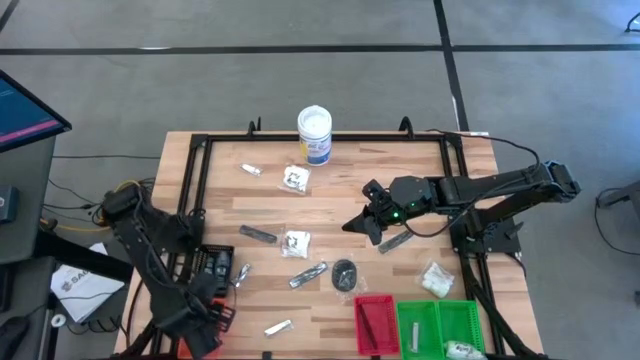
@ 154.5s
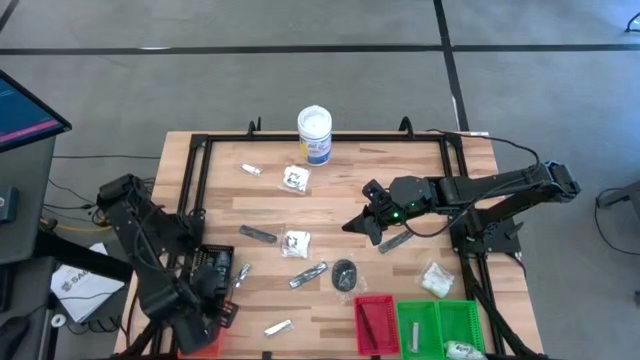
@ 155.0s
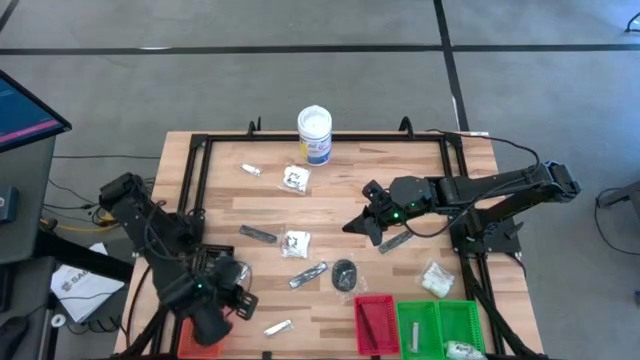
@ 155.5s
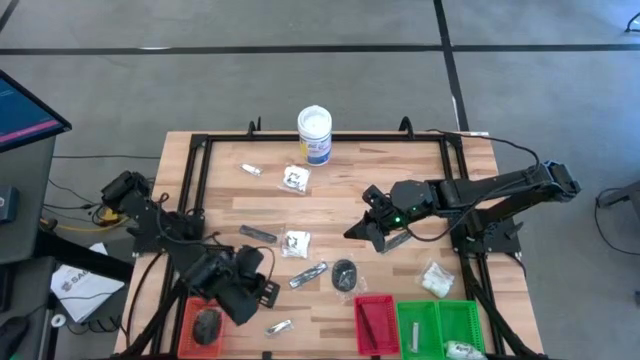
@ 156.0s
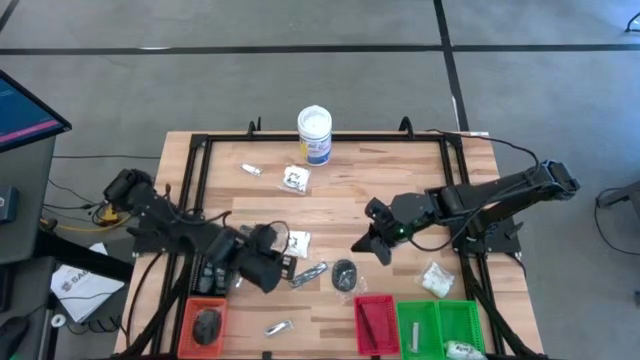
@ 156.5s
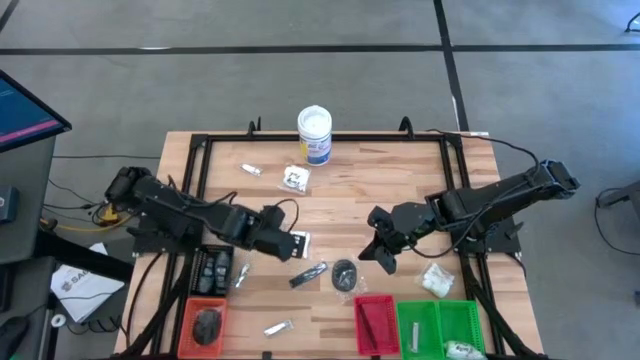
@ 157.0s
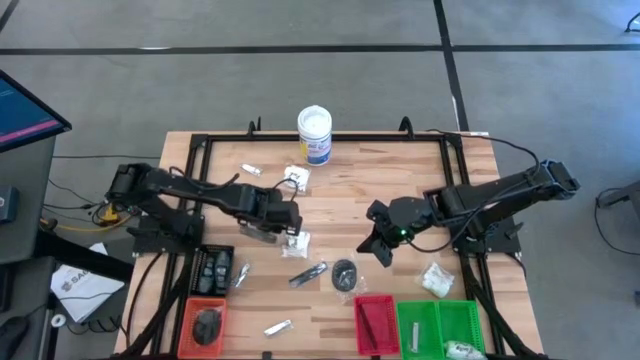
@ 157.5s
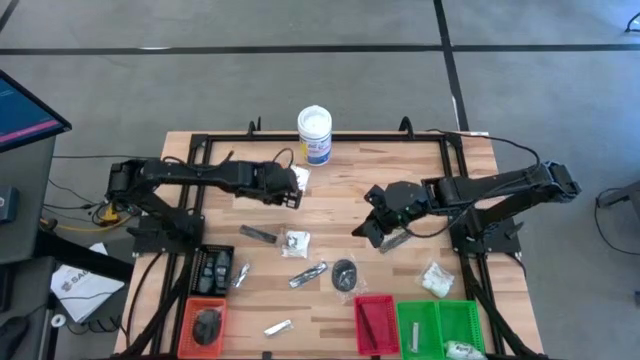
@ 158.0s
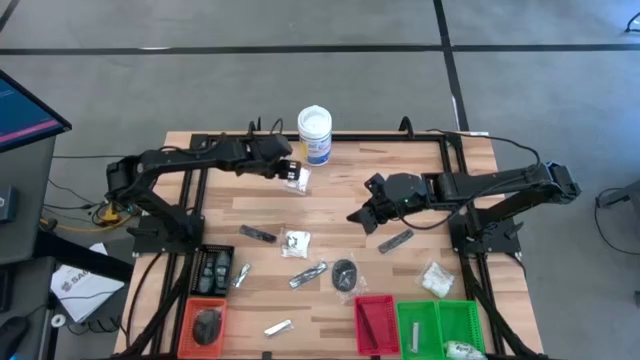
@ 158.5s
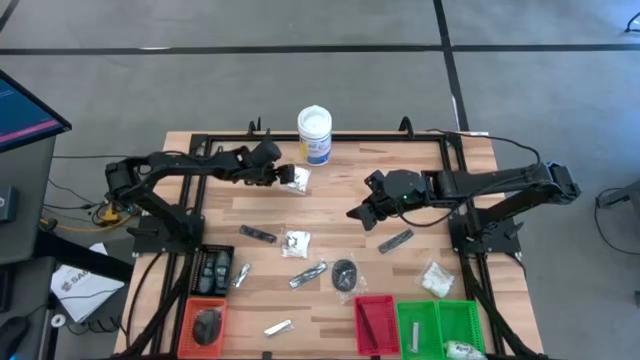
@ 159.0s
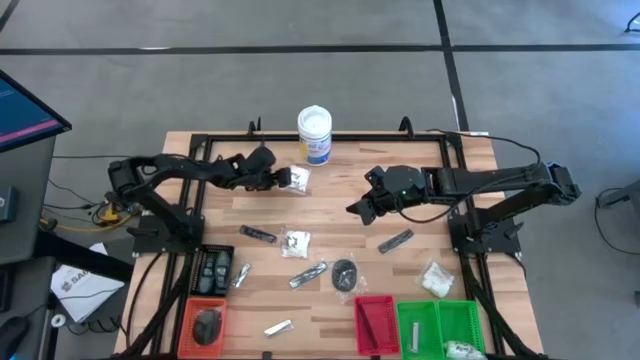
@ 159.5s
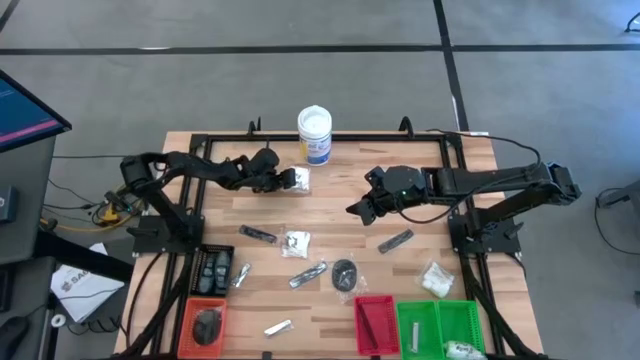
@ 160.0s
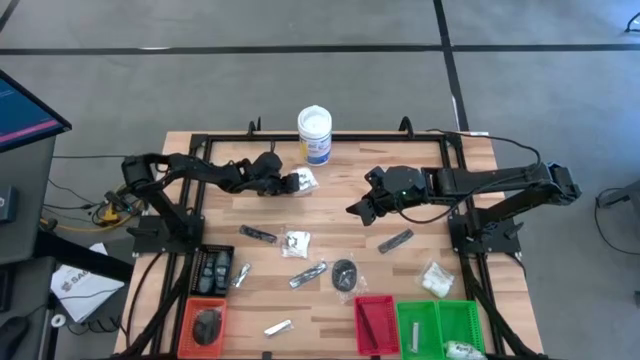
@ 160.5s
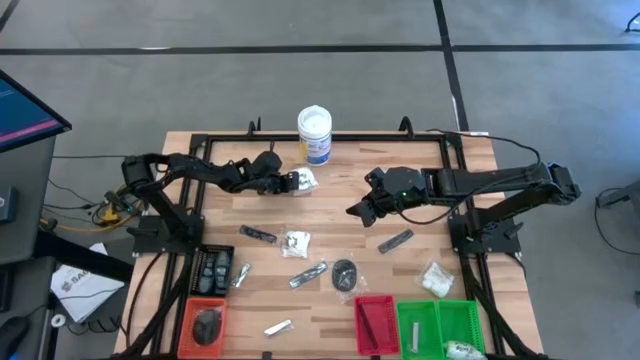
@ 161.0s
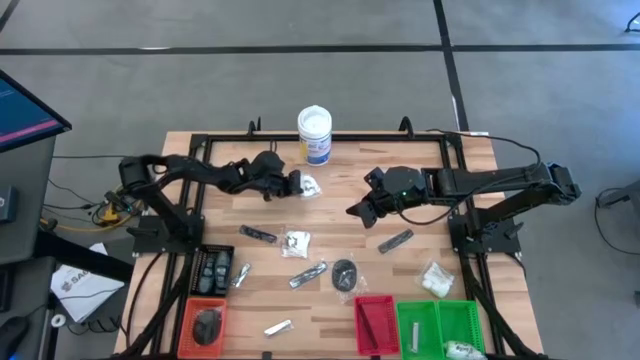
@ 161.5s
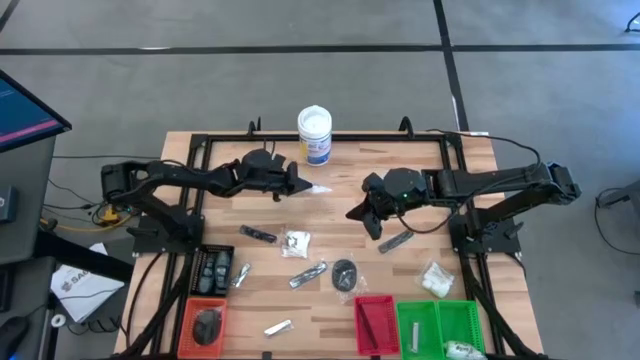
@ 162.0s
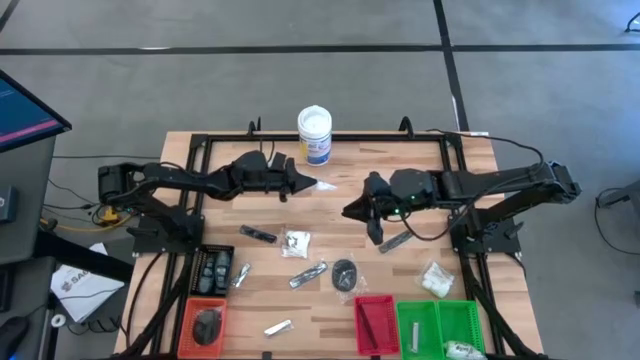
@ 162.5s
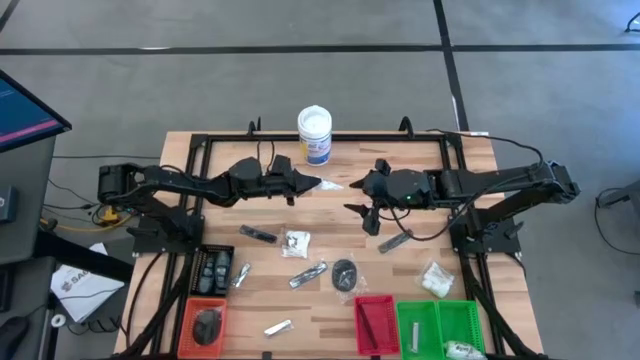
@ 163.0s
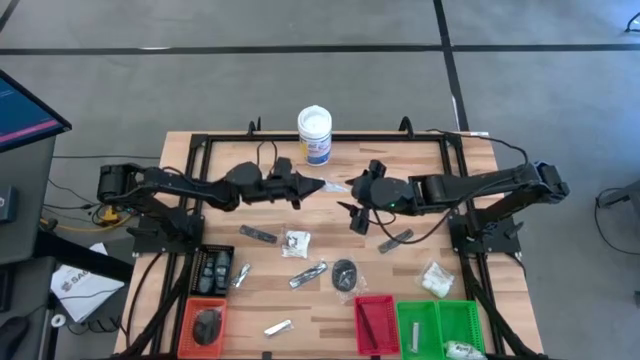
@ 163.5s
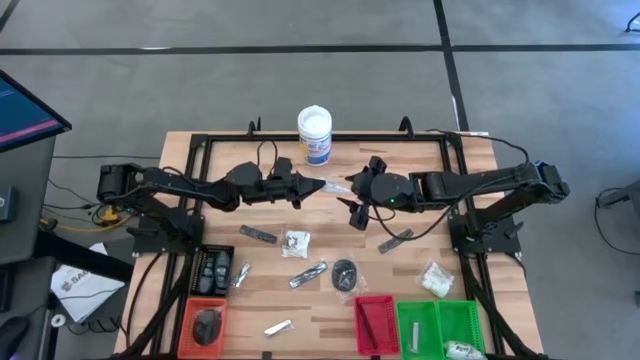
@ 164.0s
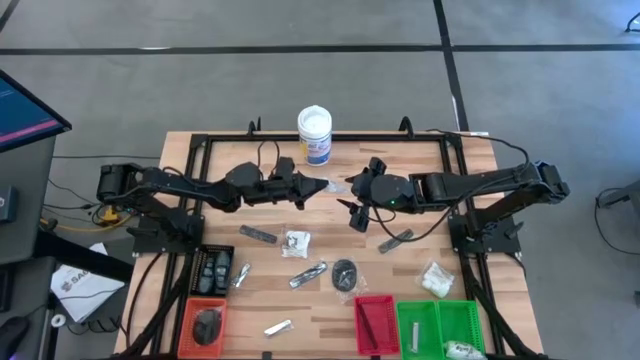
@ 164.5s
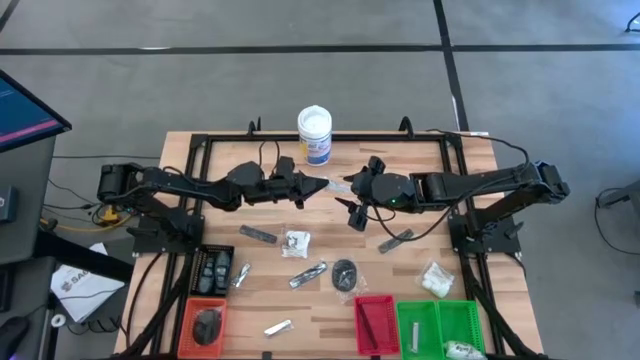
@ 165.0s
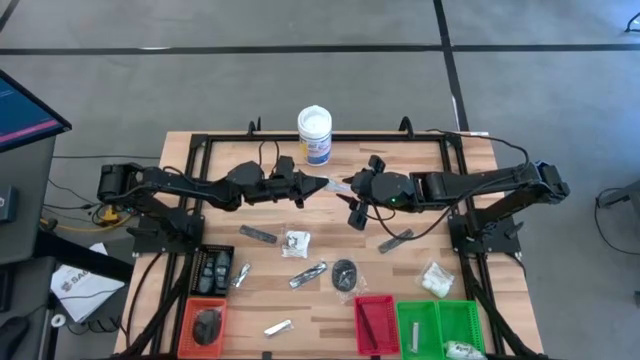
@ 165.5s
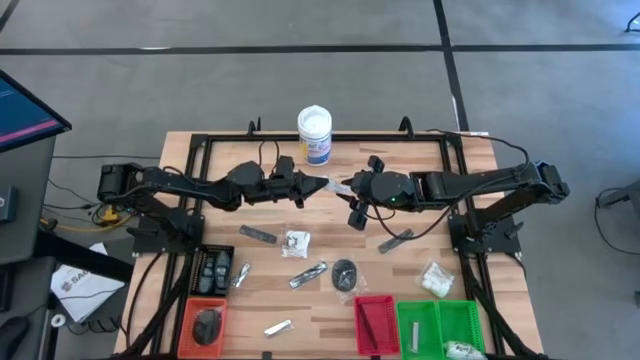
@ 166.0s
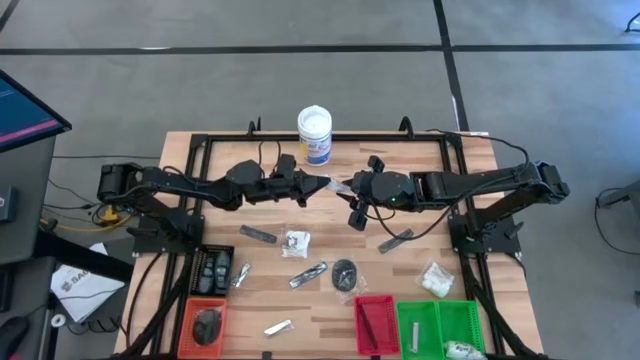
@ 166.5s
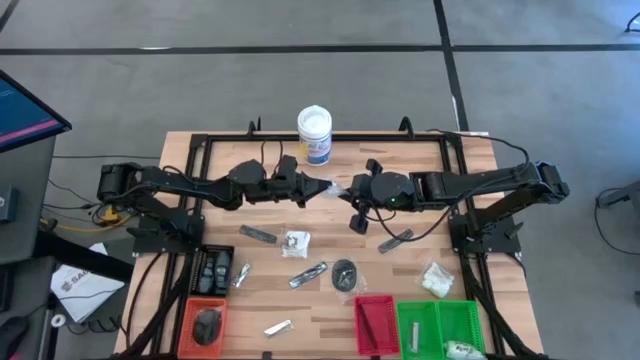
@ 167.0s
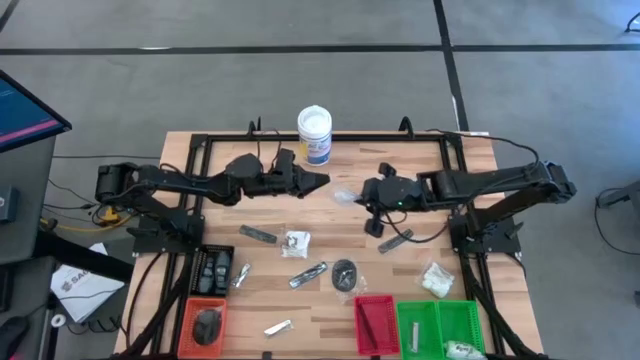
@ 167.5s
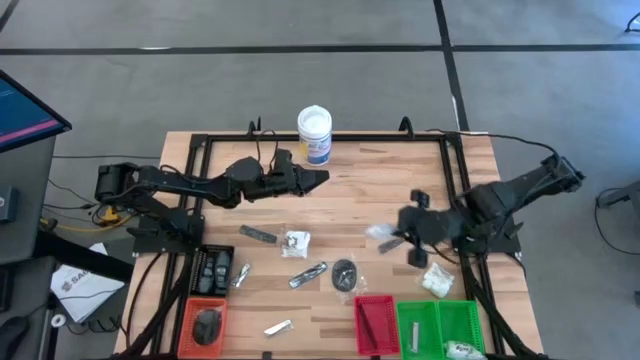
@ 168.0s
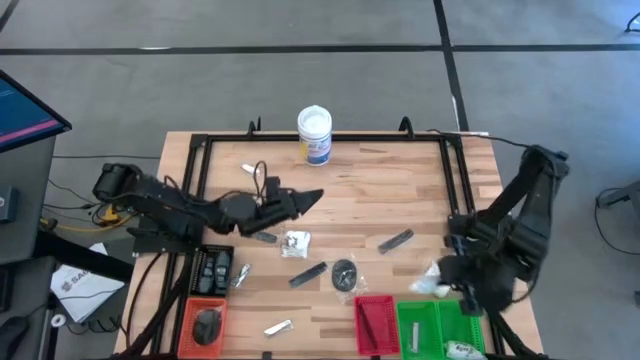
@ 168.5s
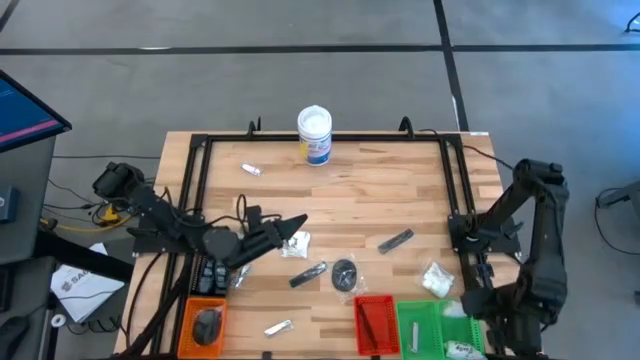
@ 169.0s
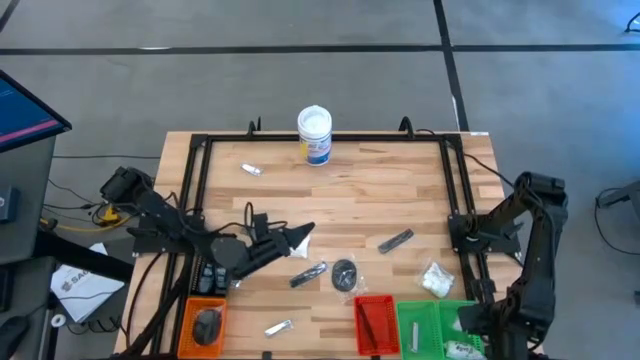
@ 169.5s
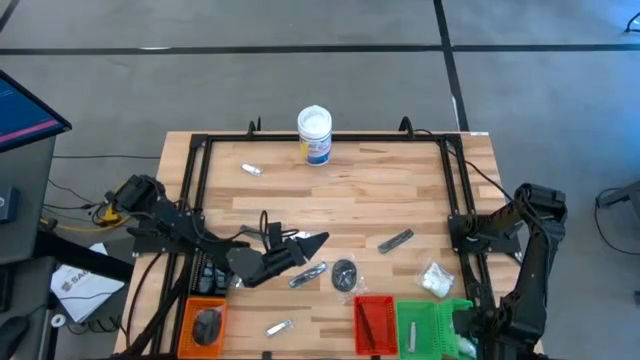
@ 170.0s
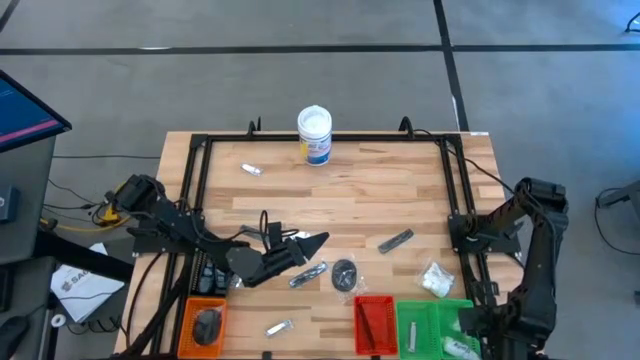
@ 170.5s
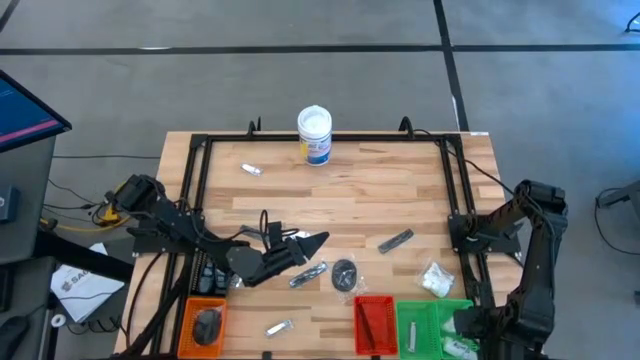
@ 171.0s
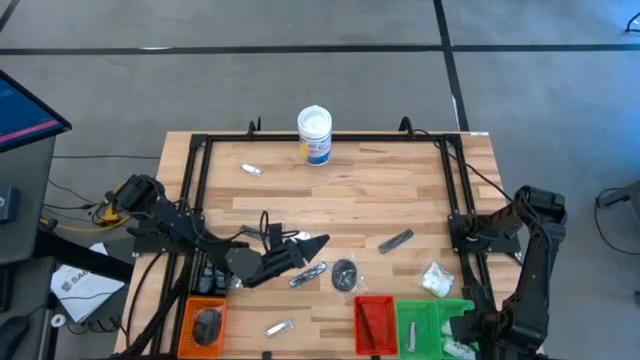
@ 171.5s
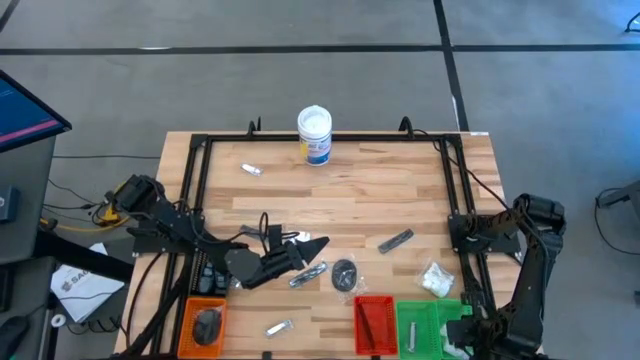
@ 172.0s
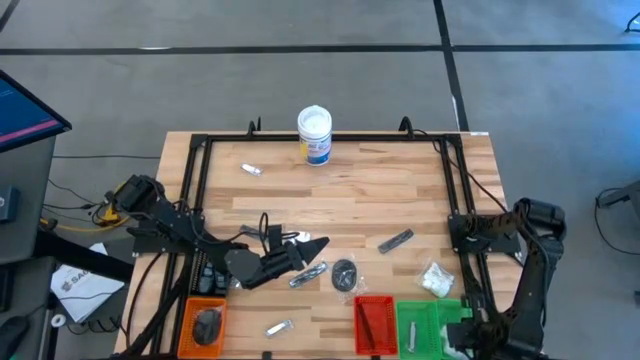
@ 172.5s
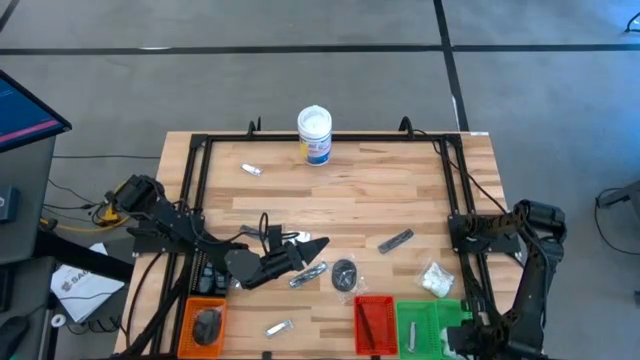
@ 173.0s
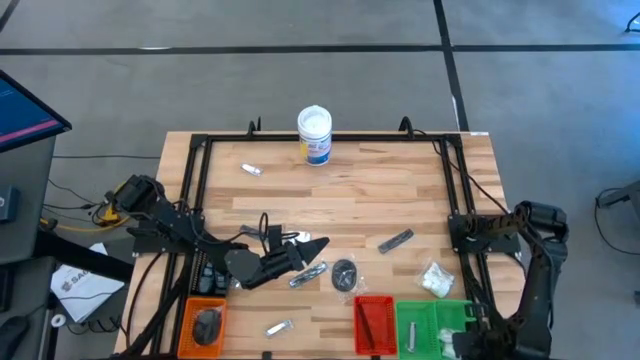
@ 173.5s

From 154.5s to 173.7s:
Task: Pick & Place Travel size toiletries
Put the white cotton pack into the right green bin

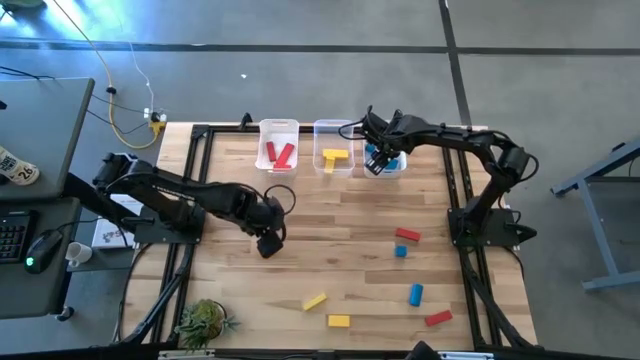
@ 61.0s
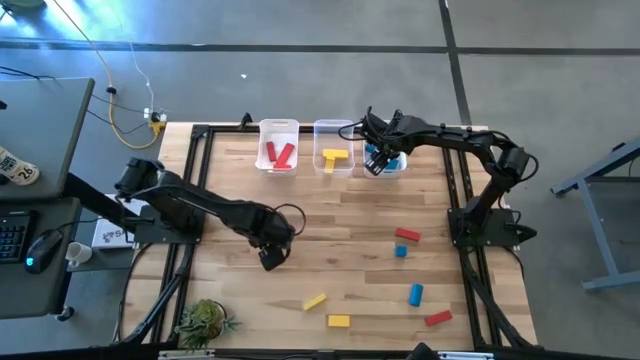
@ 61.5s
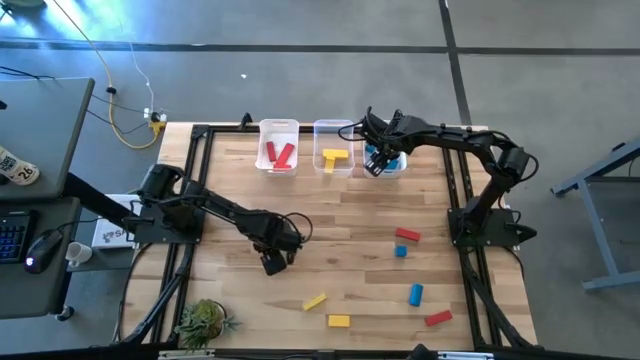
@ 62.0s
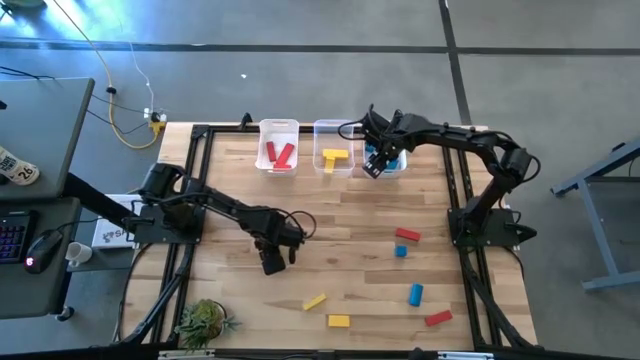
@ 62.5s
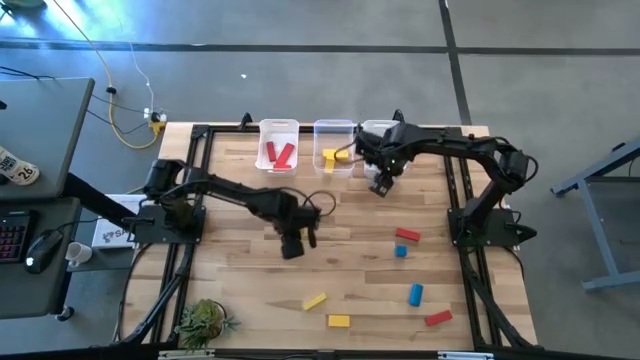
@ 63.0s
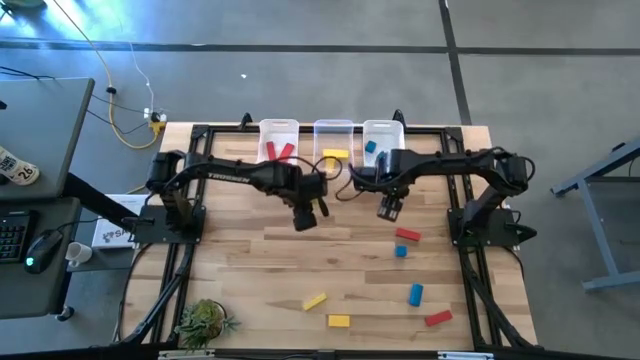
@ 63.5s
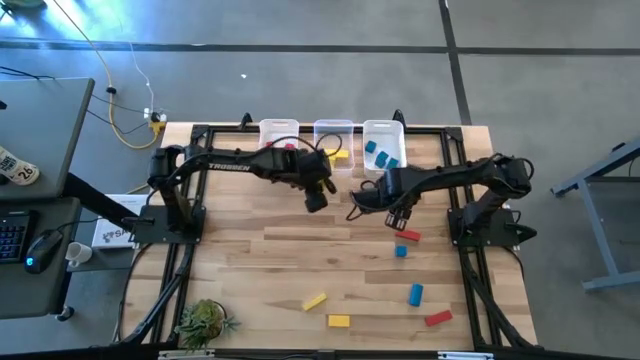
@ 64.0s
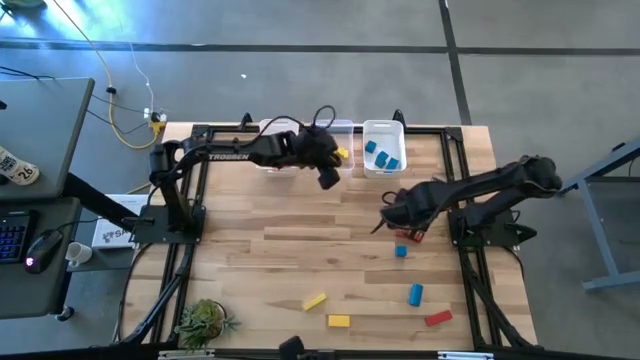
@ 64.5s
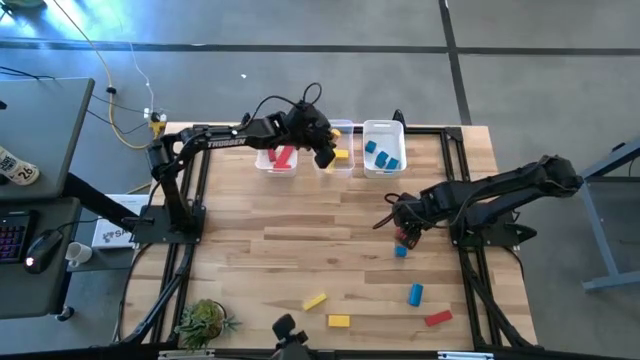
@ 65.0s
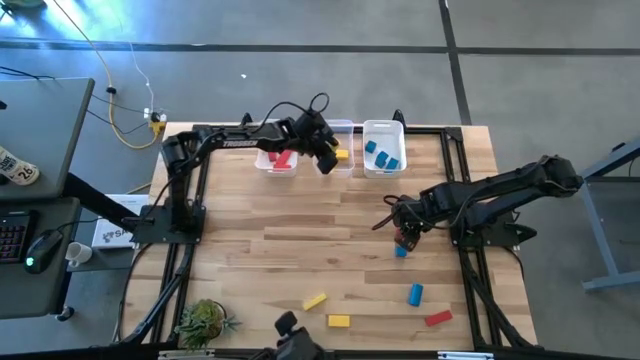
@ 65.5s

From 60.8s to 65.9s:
Task: Sort & place blocks by color
Put the yellow block into the transparent bin
